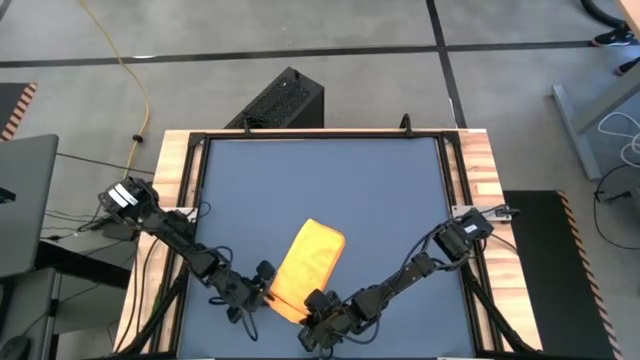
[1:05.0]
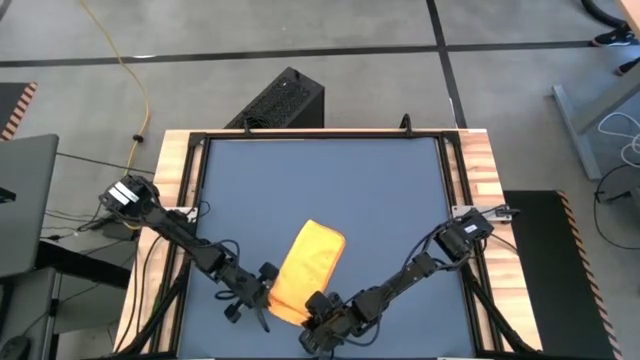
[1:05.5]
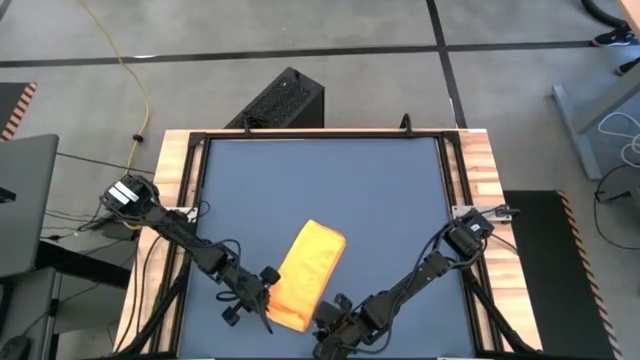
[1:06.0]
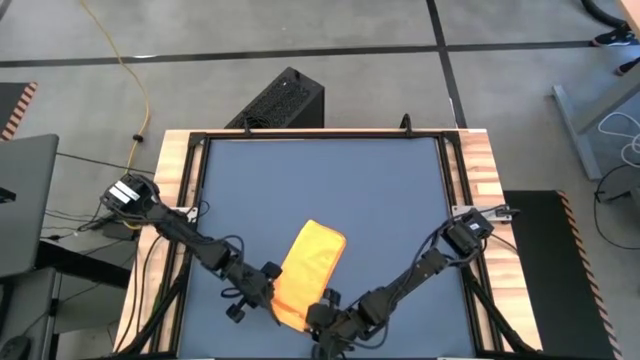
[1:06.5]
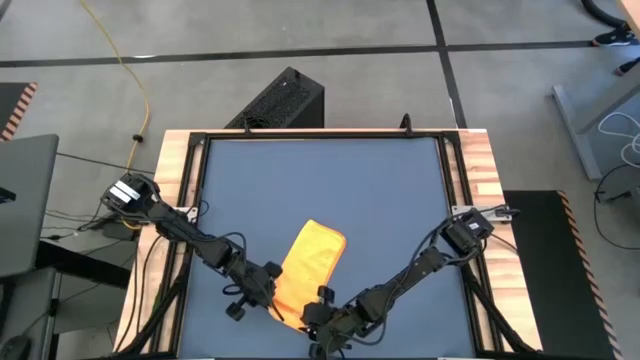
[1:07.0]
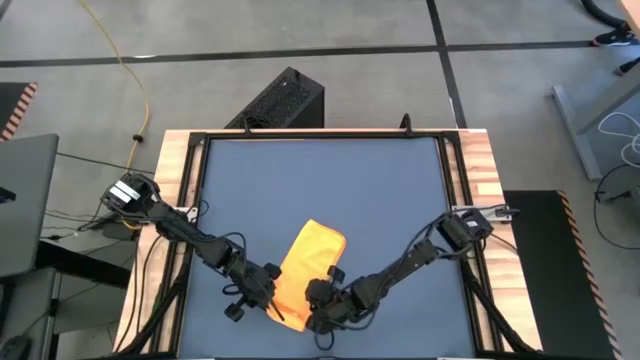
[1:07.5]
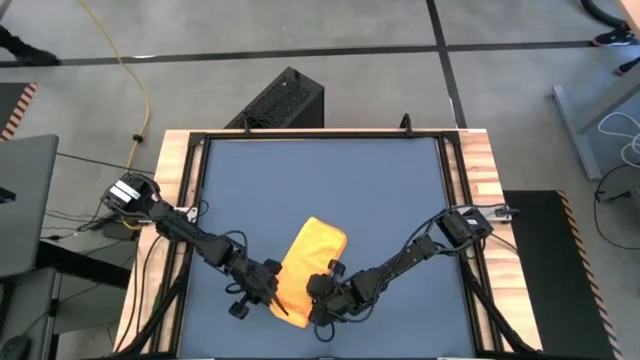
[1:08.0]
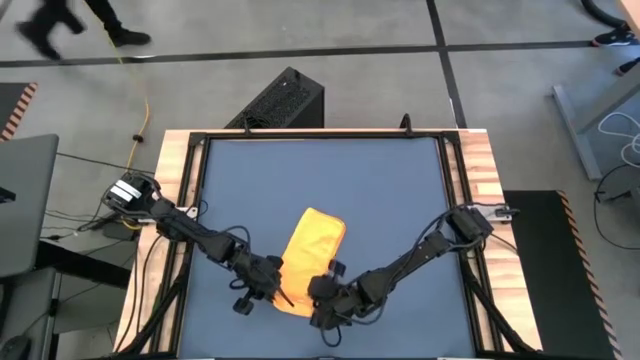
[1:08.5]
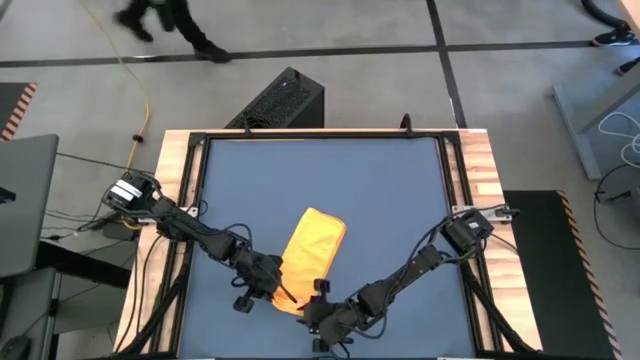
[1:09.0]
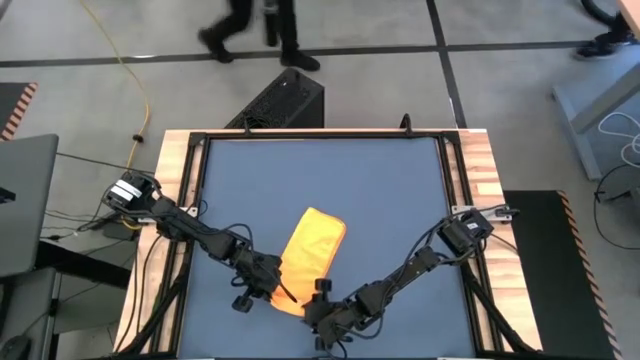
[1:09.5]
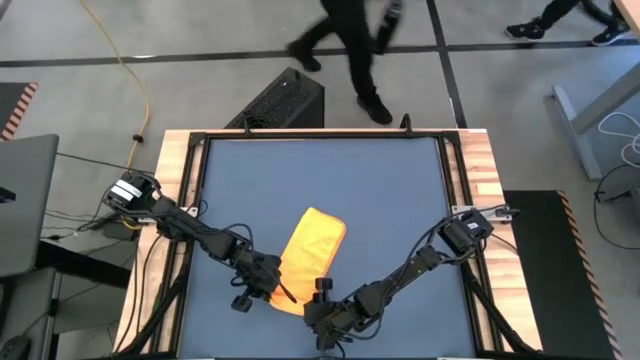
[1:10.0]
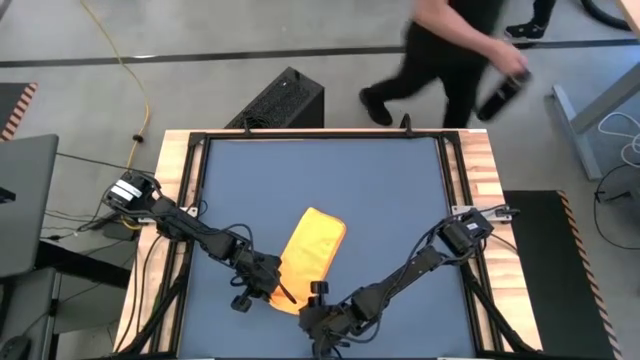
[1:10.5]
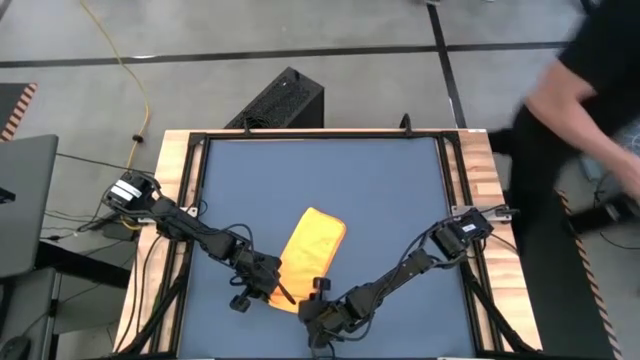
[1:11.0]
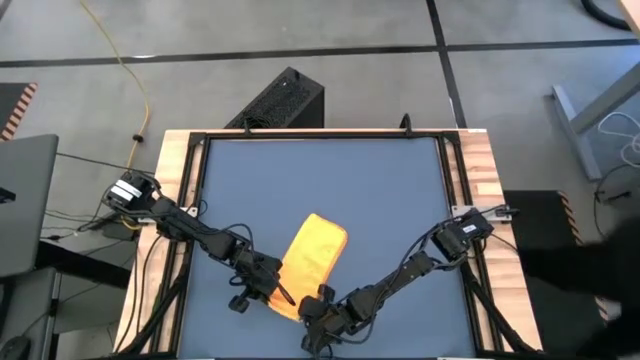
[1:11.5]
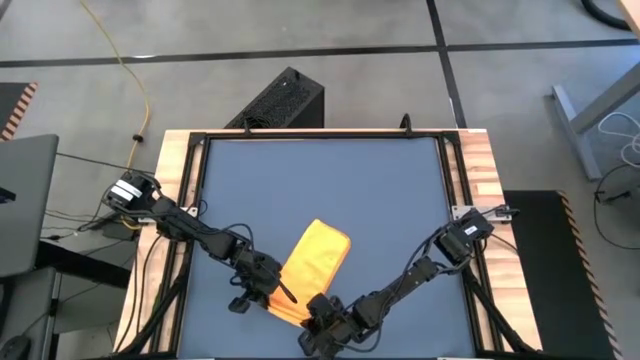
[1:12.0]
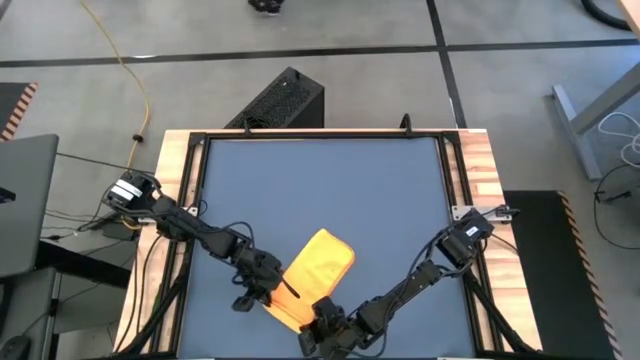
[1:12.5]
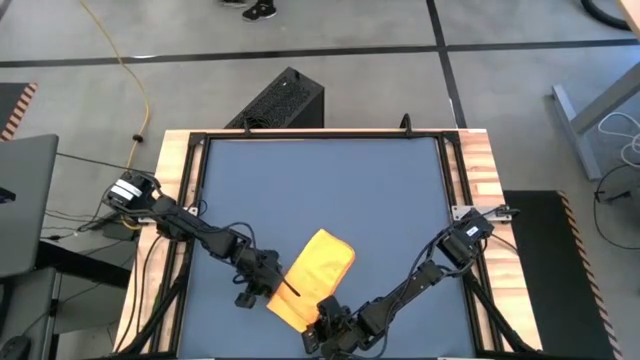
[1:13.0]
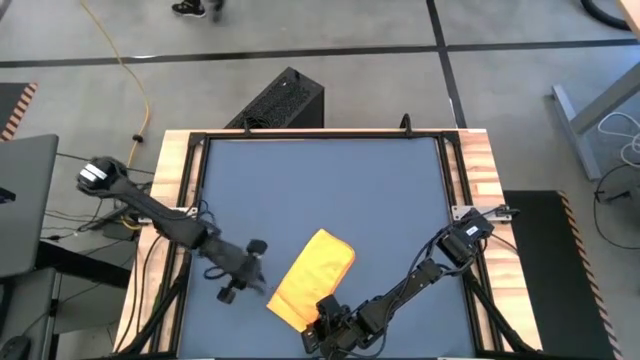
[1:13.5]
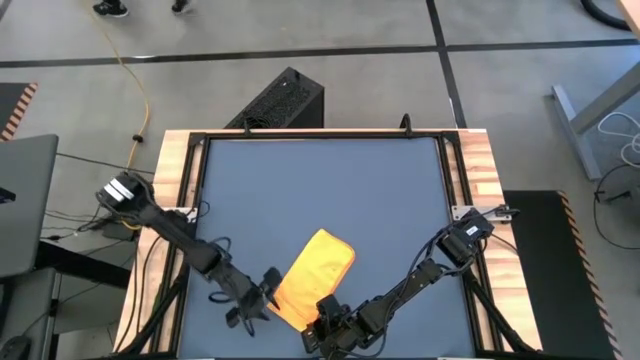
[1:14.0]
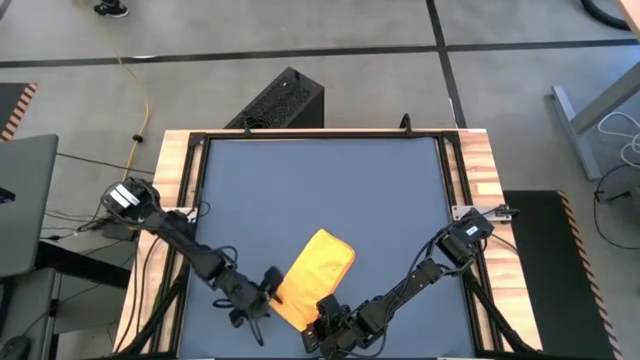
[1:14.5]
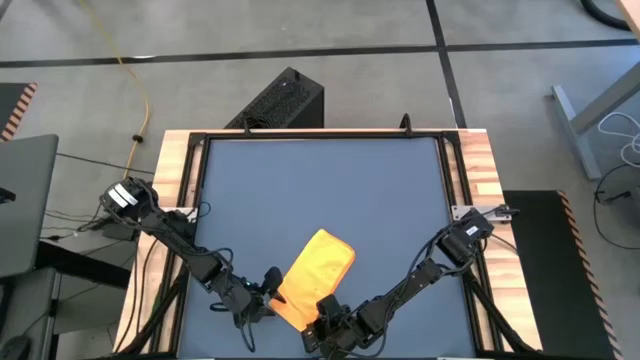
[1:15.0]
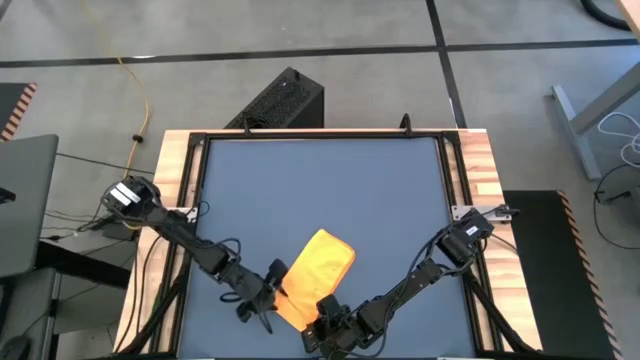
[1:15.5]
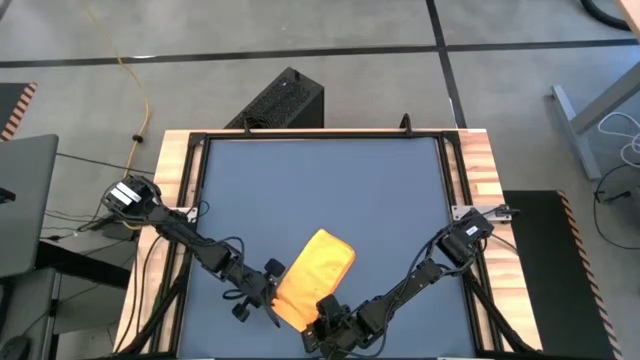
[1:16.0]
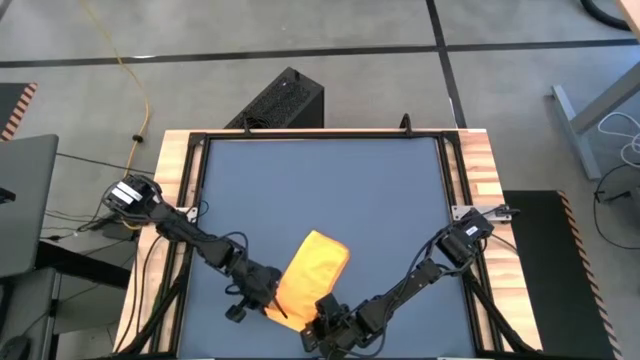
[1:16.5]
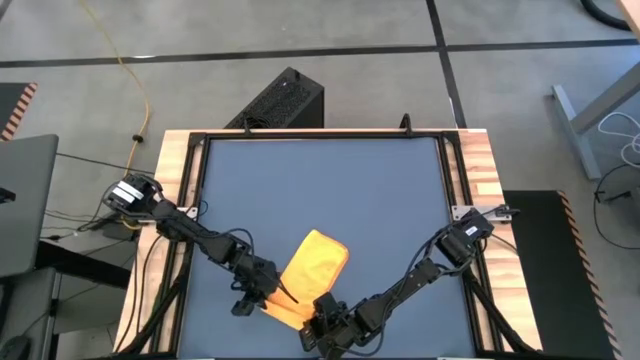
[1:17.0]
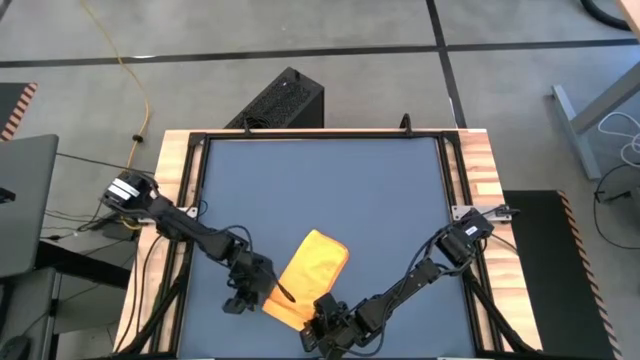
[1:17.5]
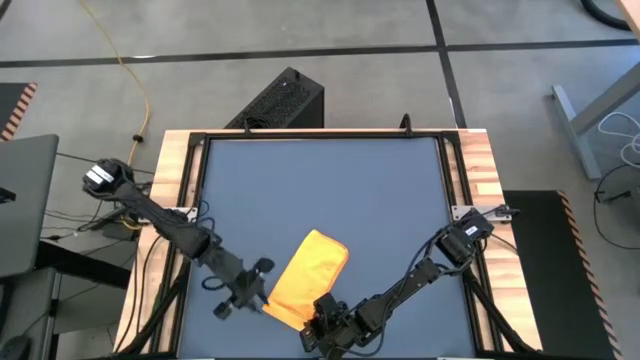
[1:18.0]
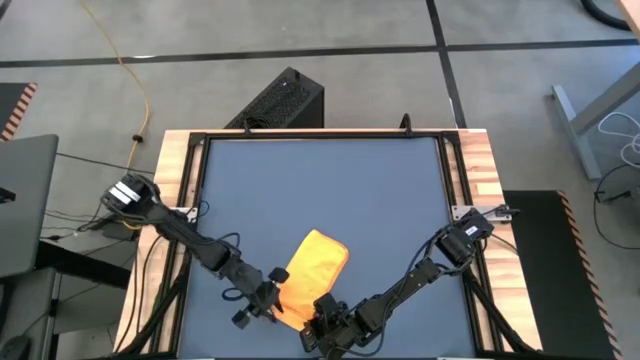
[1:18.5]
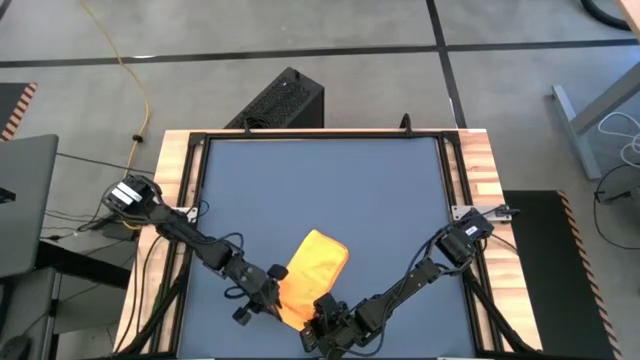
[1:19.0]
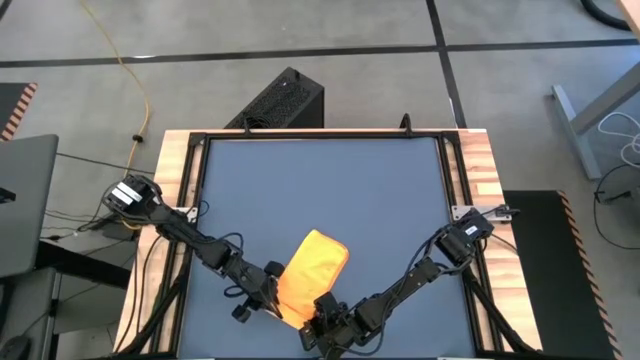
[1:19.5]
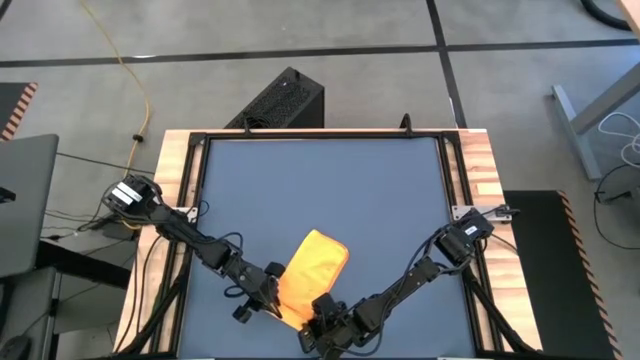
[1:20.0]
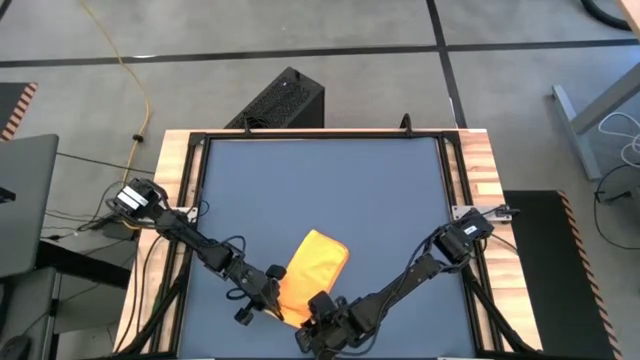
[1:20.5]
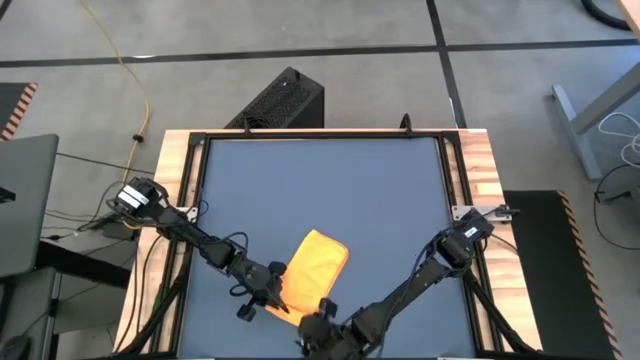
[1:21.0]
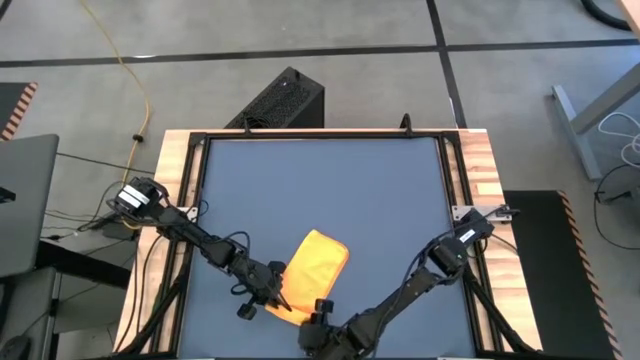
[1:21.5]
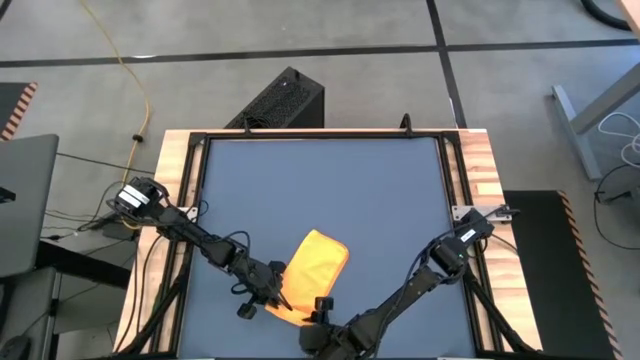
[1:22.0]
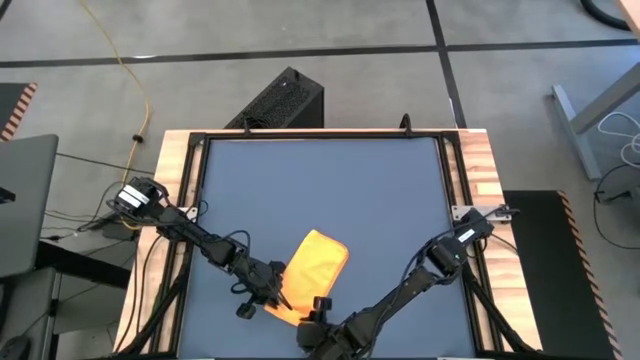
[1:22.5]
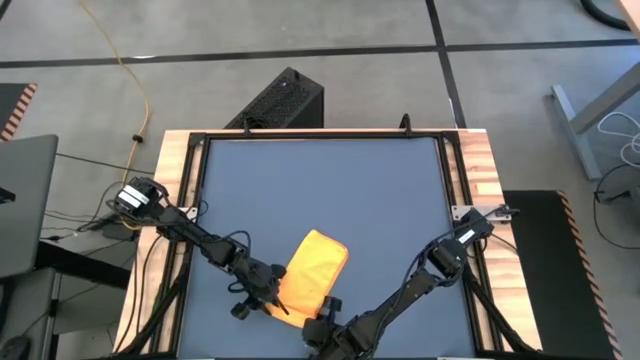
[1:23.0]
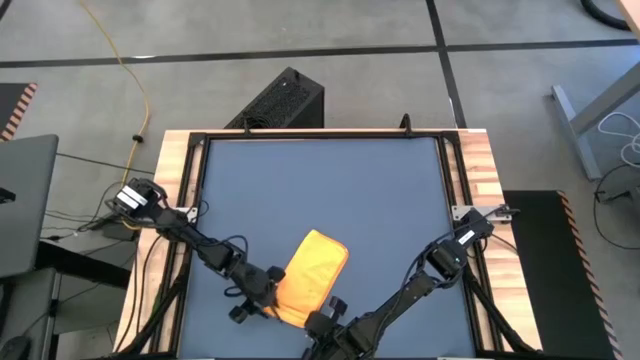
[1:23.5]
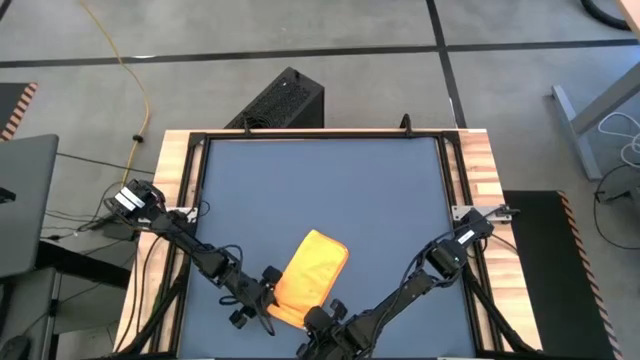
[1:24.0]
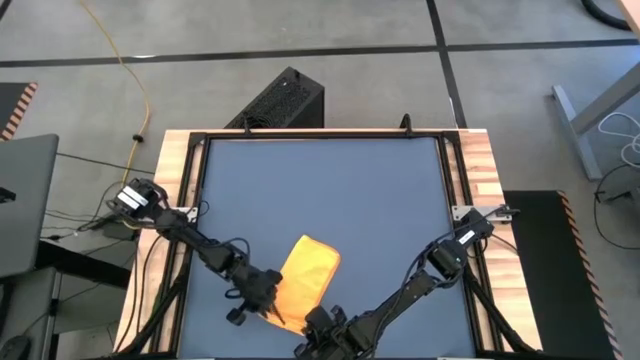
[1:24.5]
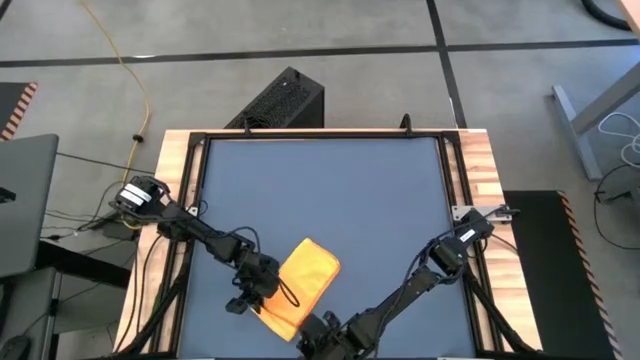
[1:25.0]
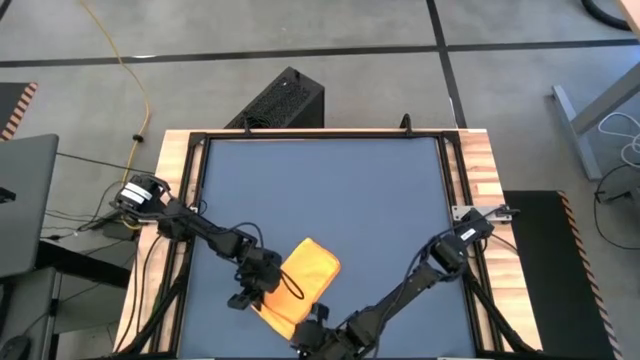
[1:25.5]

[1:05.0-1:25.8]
Task: Roll towel
Roll the orange microfiber towel

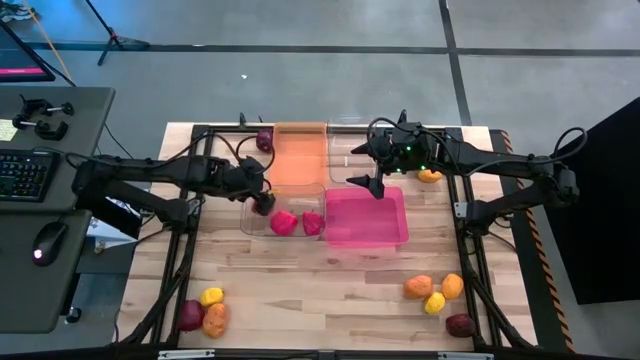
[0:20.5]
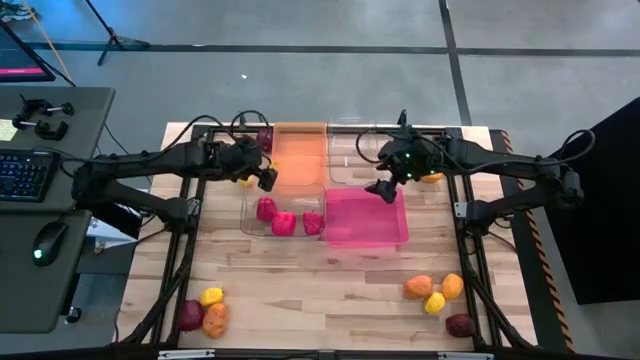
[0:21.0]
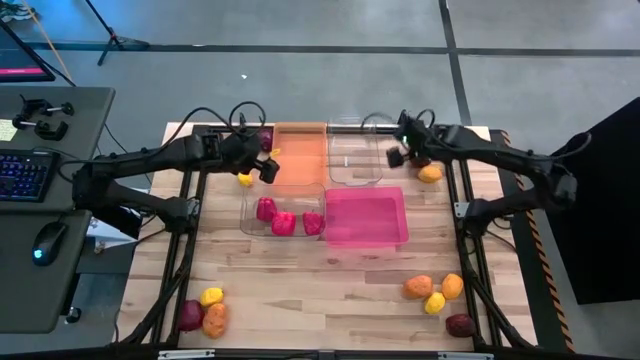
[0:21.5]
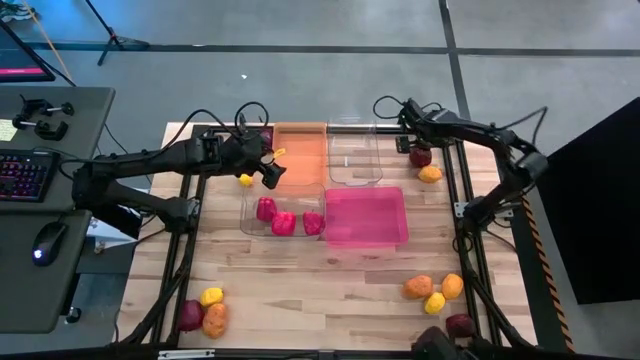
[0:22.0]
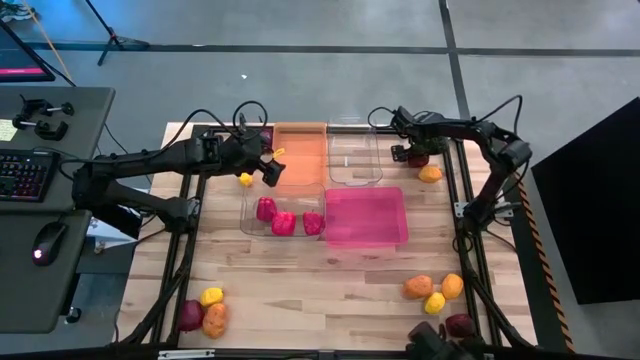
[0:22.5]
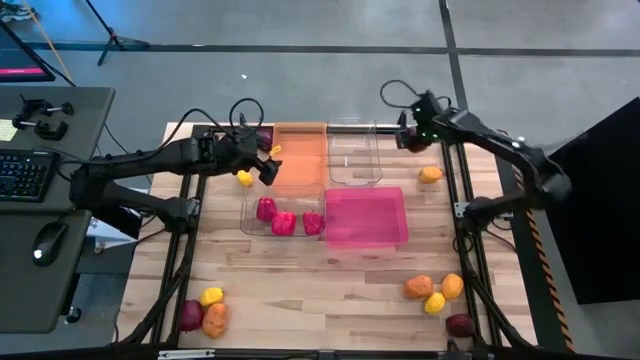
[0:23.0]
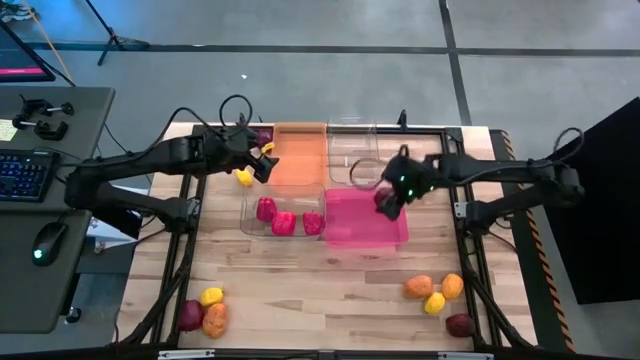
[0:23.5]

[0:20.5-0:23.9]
Task: Sort produce into baskets
Put the red apple into the pink bin
